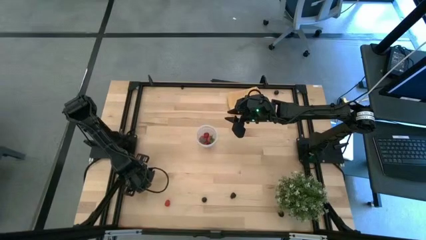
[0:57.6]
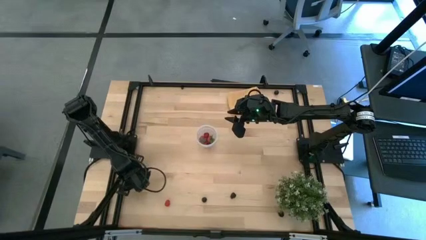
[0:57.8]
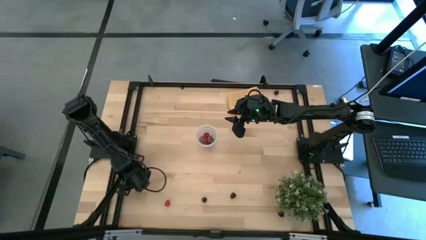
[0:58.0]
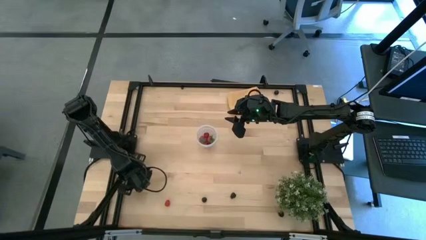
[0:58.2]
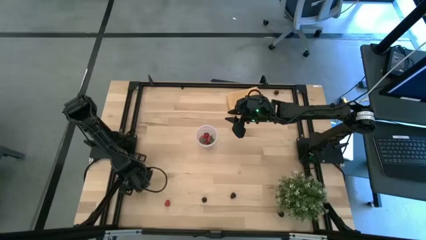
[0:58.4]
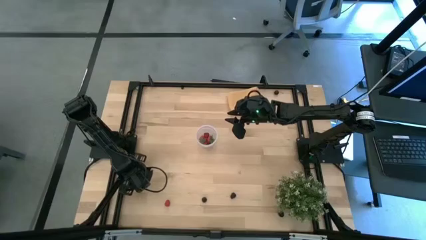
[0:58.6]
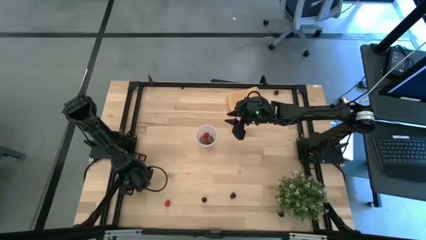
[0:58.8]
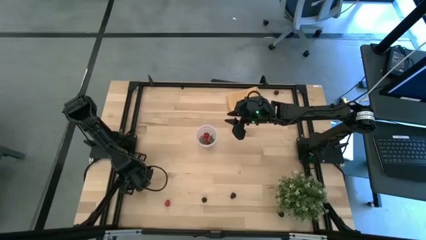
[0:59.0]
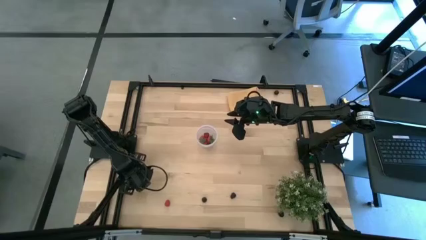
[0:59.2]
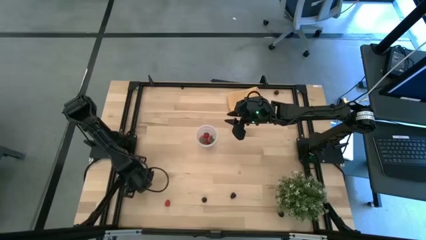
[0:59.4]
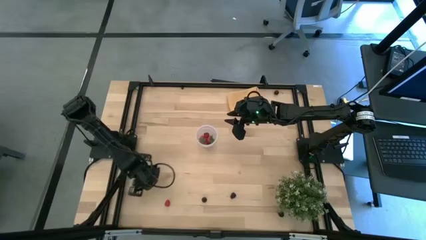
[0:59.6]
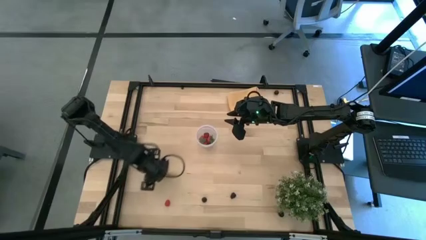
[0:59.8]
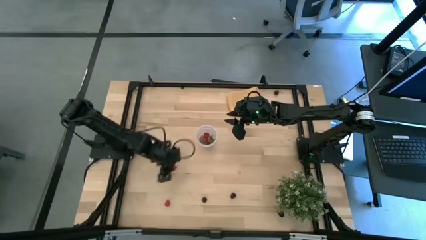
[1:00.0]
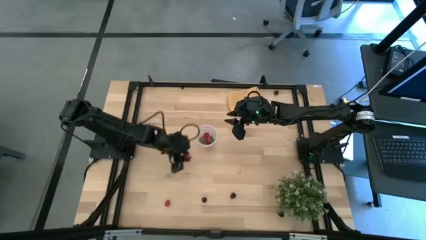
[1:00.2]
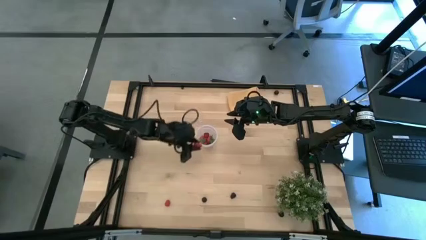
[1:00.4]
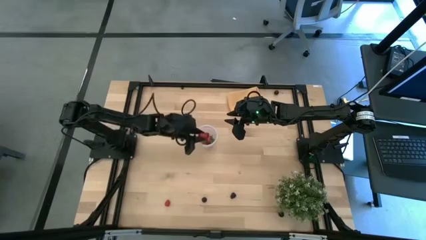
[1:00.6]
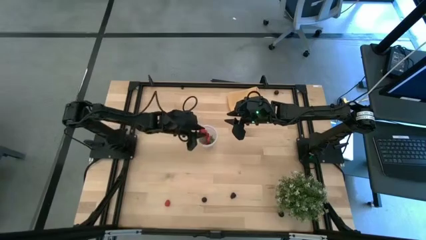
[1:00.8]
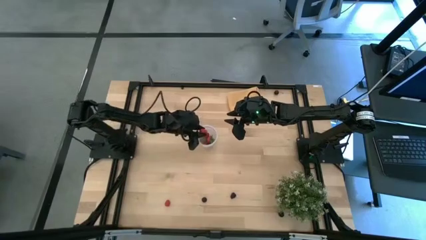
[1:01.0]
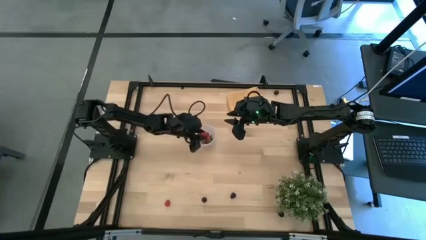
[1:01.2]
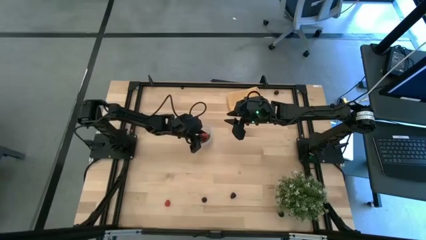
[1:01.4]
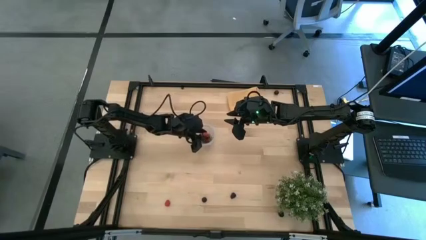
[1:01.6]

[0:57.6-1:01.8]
Task: Pick and placing Produce into tupperware
Put the red strawberry into the transparent container

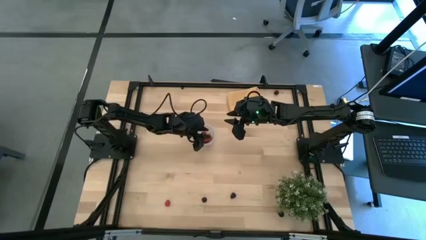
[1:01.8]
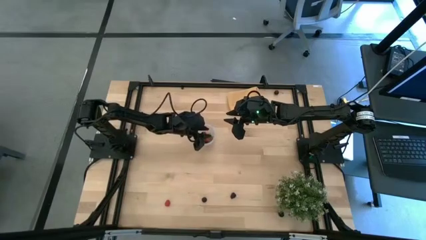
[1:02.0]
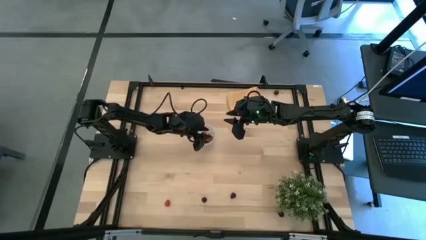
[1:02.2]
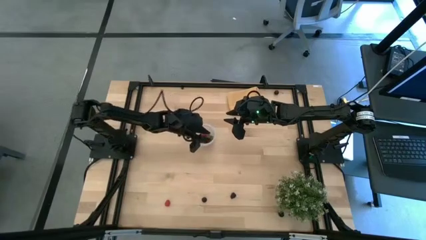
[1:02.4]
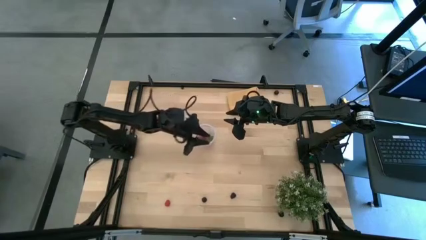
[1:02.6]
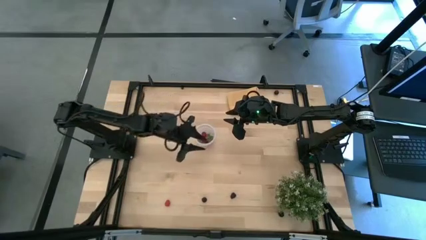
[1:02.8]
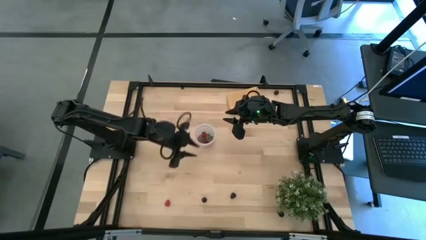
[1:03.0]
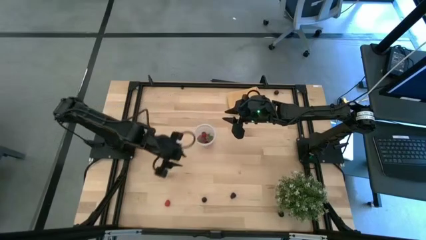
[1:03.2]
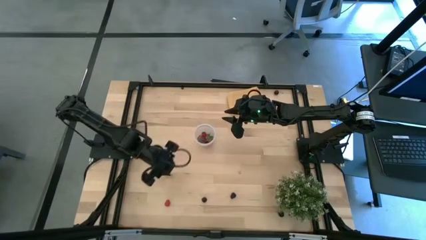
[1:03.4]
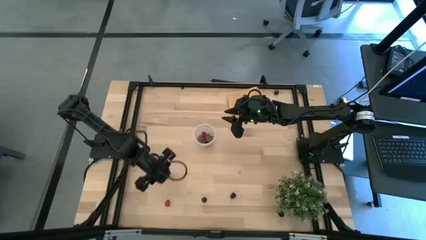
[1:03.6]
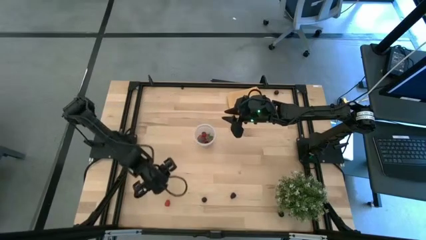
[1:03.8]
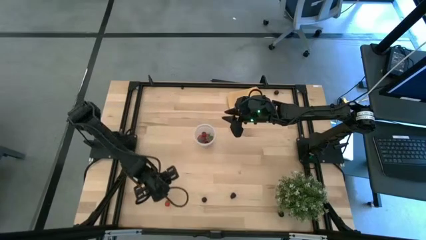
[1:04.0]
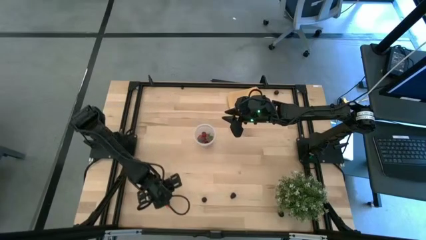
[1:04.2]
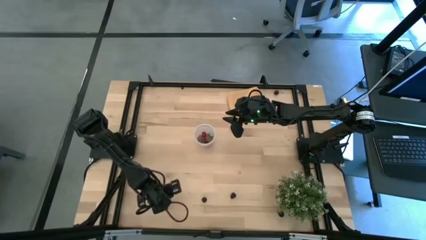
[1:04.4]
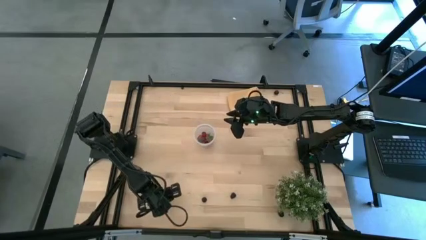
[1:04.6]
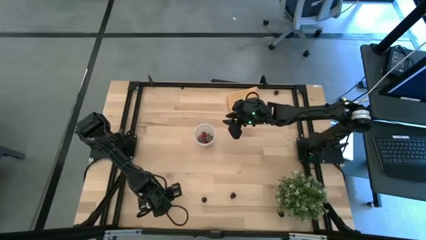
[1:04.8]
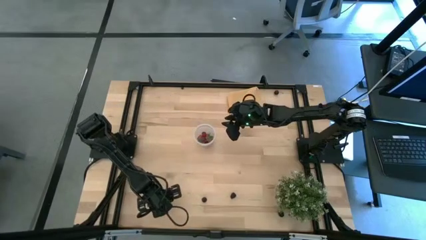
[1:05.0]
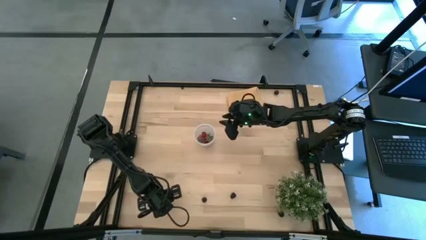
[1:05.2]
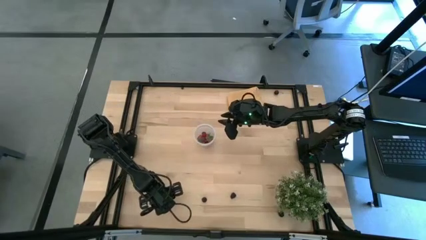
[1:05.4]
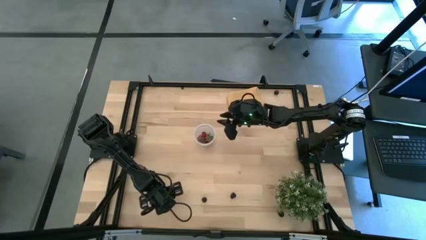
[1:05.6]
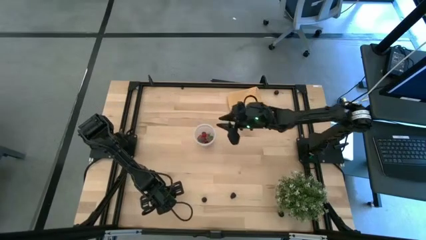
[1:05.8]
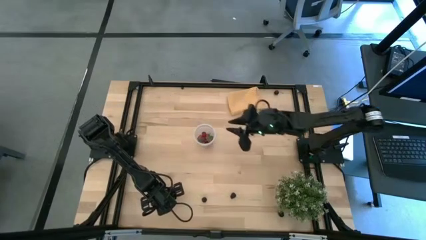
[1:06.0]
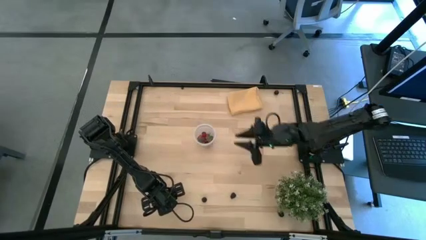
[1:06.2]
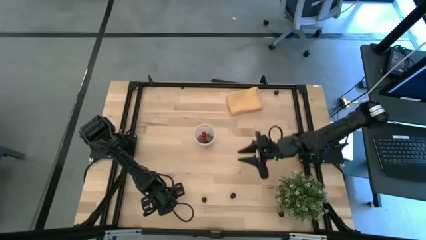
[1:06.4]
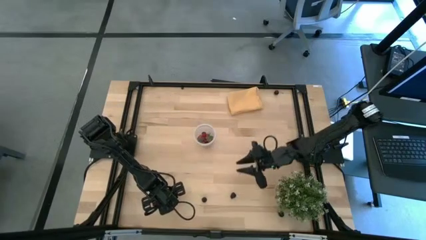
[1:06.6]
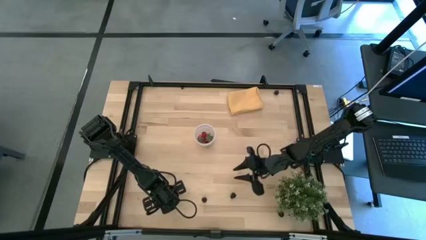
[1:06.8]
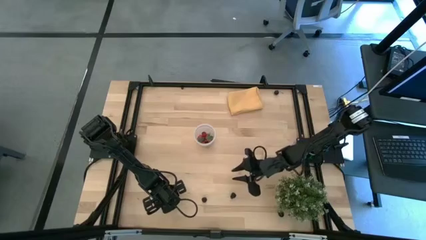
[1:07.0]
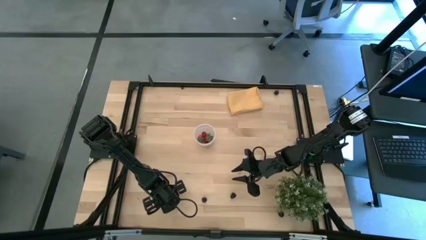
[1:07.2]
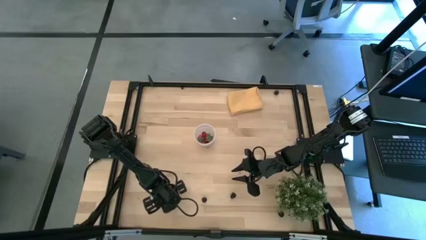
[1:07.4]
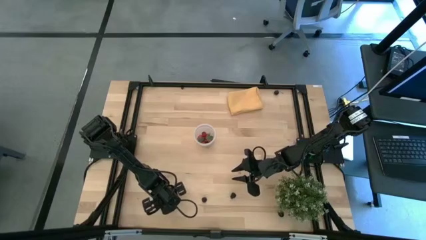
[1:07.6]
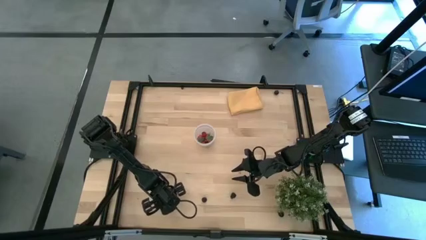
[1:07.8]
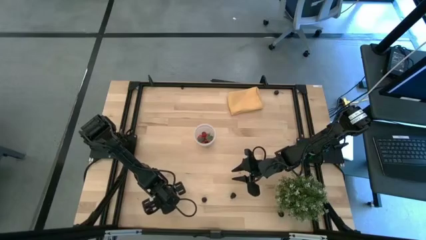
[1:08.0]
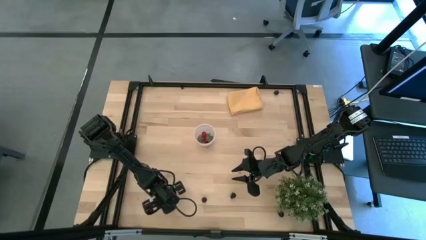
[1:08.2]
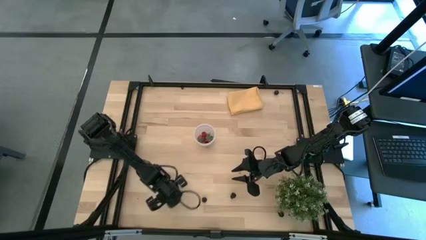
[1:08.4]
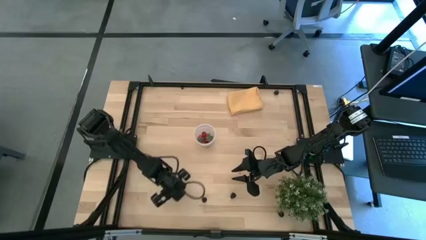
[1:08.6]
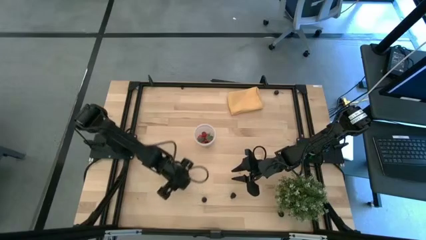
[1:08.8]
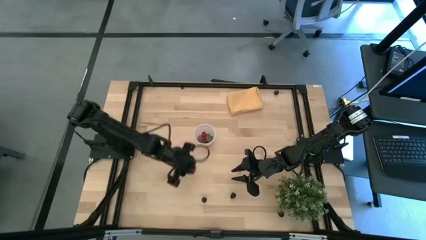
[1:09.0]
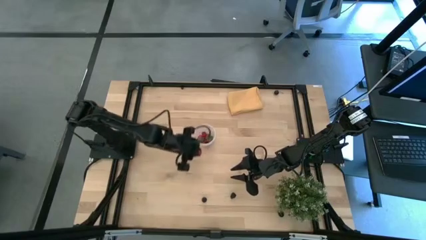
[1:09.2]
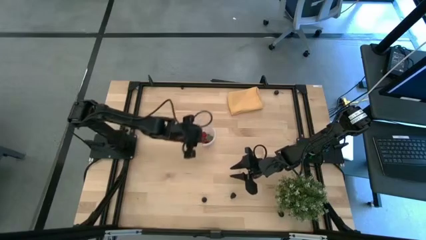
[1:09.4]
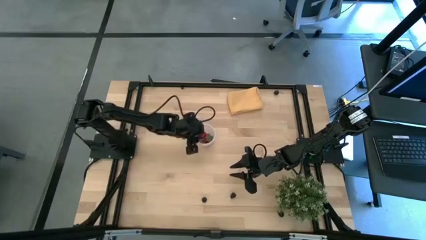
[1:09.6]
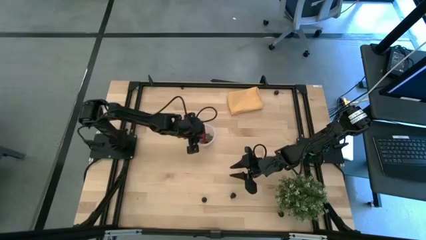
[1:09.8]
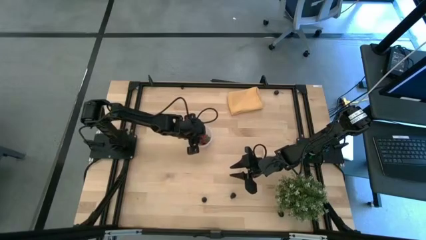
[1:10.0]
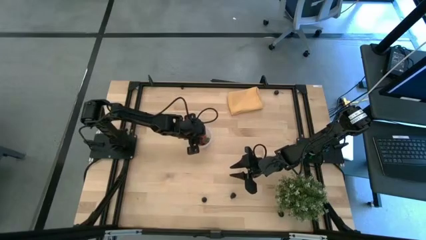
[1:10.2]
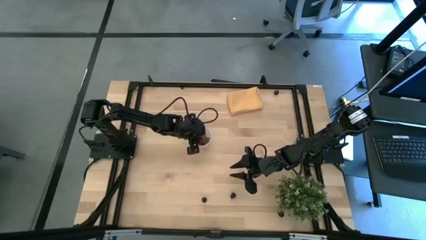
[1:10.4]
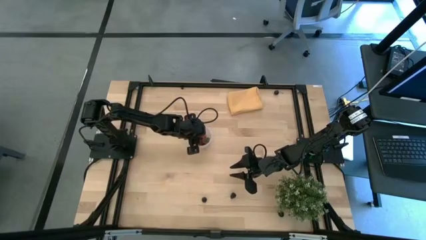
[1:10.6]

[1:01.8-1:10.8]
Put the red raspberry into the transparent container

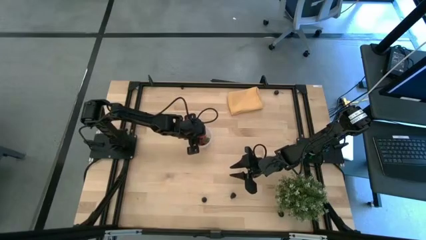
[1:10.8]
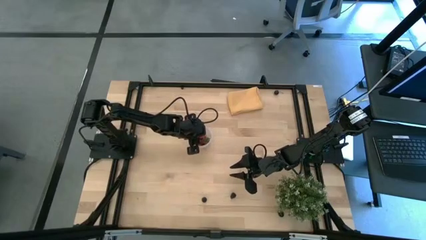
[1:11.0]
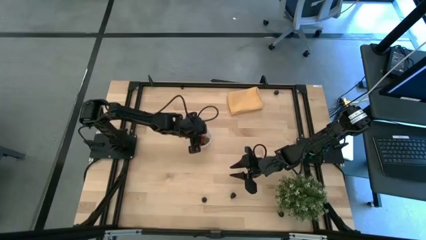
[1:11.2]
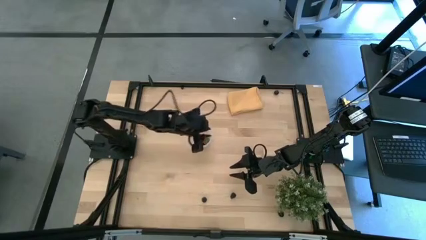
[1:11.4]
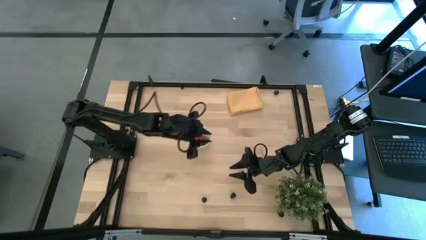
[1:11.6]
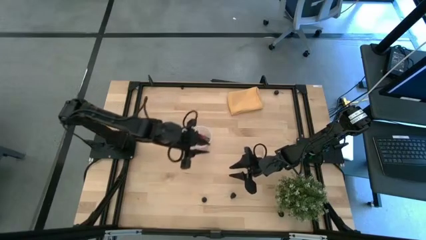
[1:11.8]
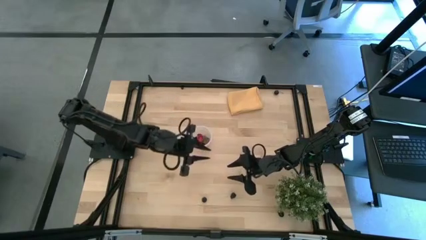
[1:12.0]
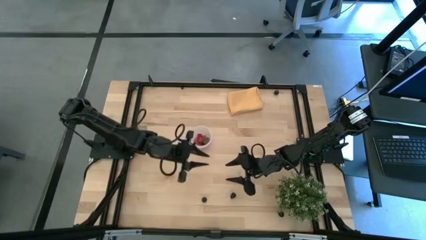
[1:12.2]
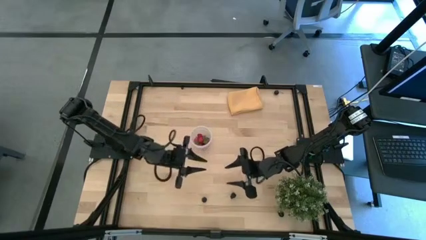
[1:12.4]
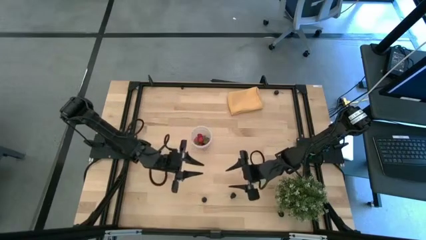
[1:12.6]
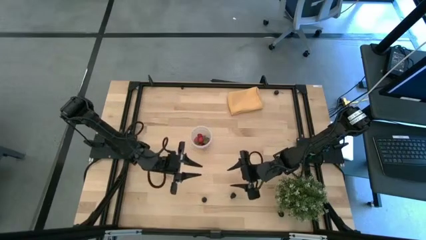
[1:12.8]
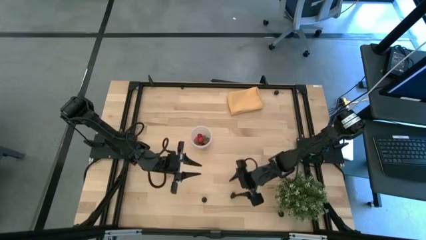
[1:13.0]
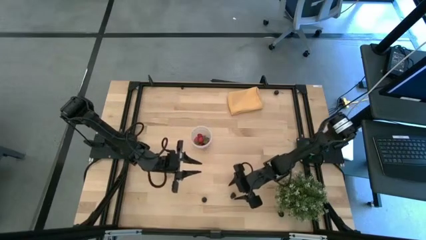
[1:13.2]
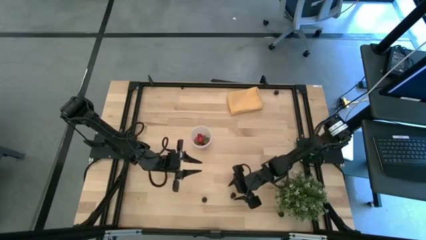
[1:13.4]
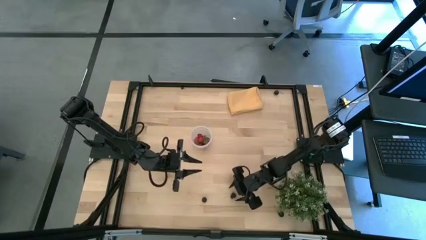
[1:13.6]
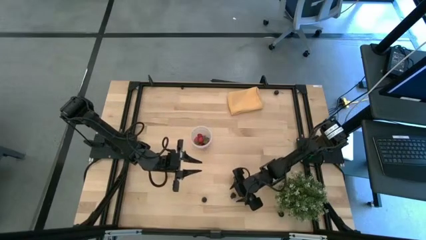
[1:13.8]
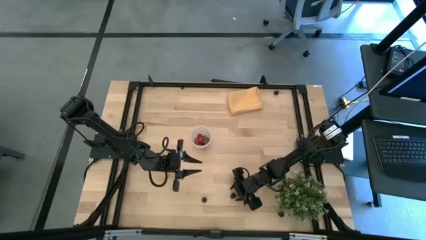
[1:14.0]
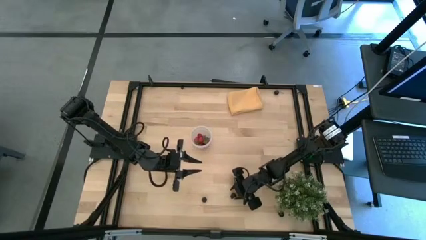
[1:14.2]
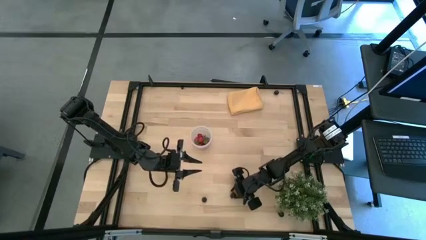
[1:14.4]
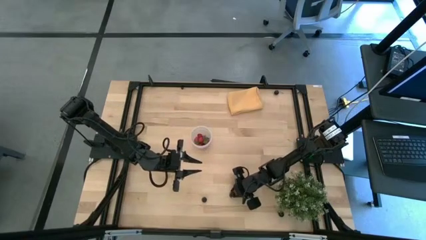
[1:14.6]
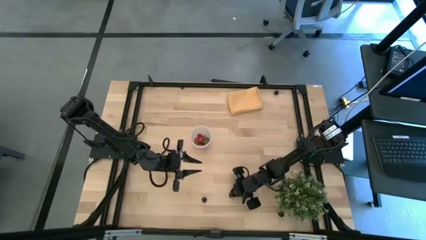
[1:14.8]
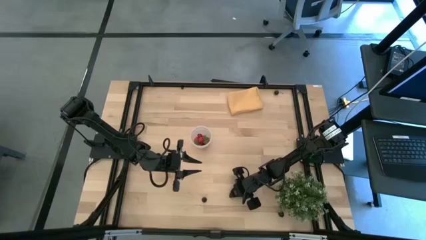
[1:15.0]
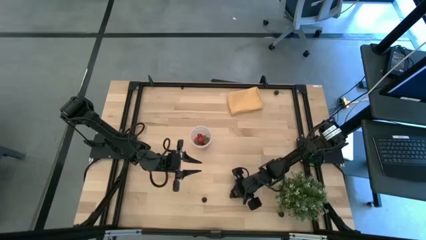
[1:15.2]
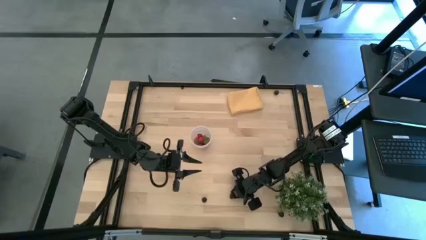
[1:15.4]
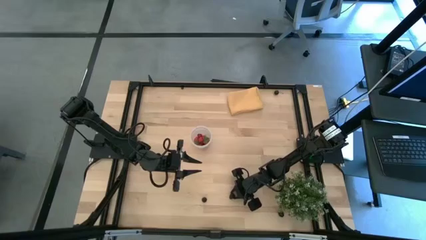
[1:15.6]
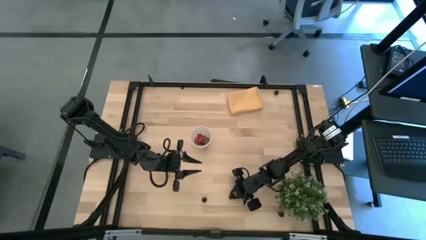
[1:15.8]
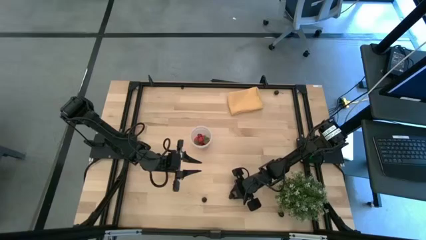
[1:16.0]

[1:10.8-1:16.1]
Put the right black raspberry into the transparent container
